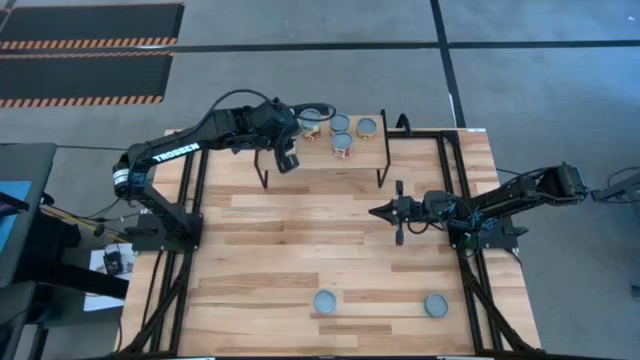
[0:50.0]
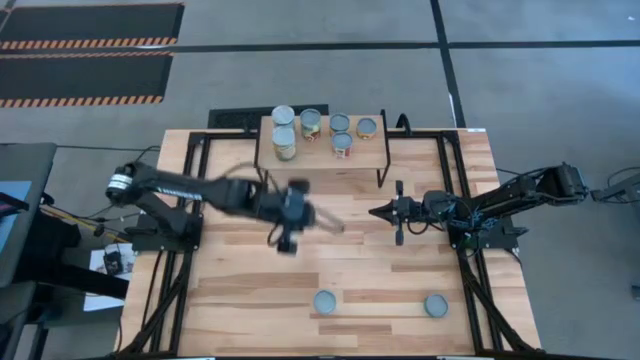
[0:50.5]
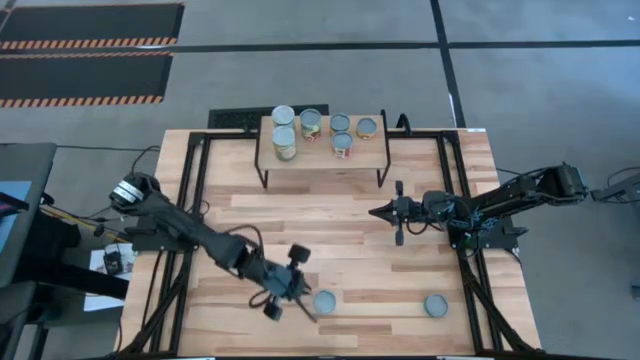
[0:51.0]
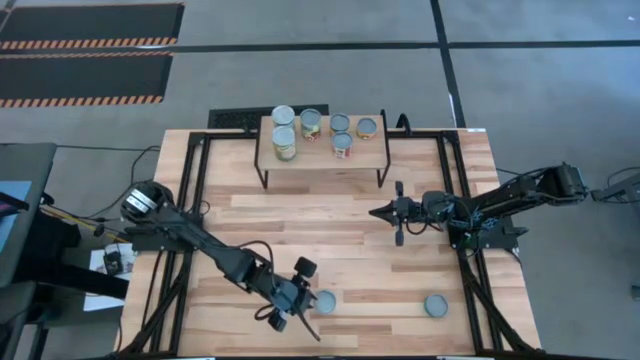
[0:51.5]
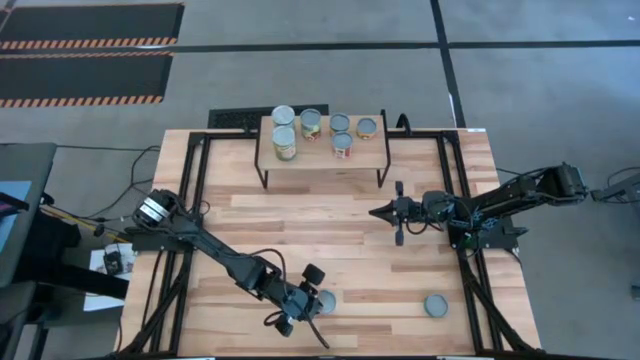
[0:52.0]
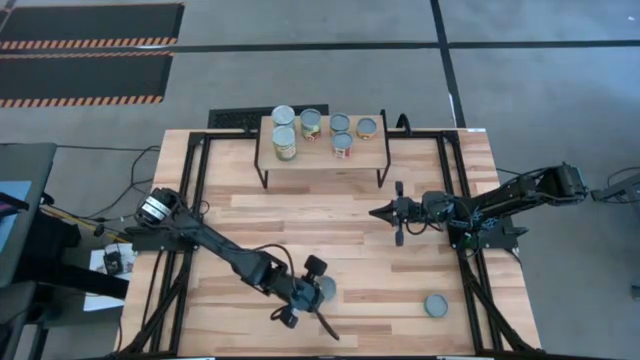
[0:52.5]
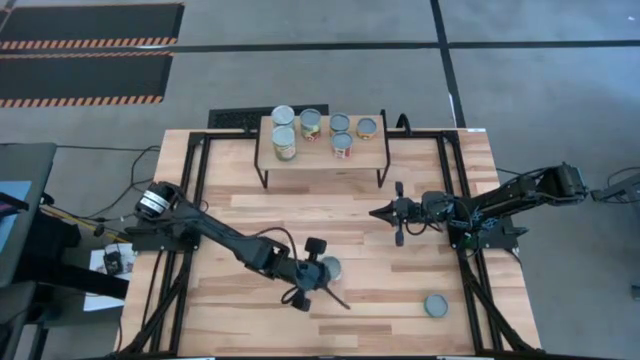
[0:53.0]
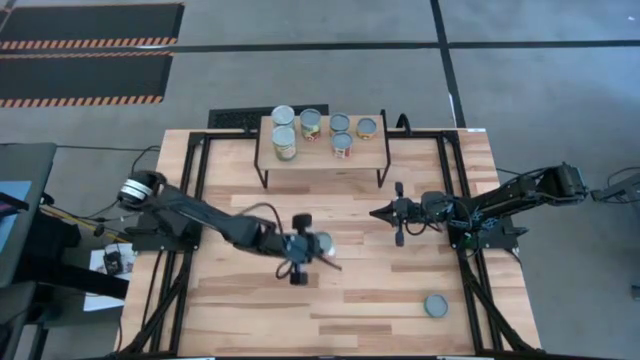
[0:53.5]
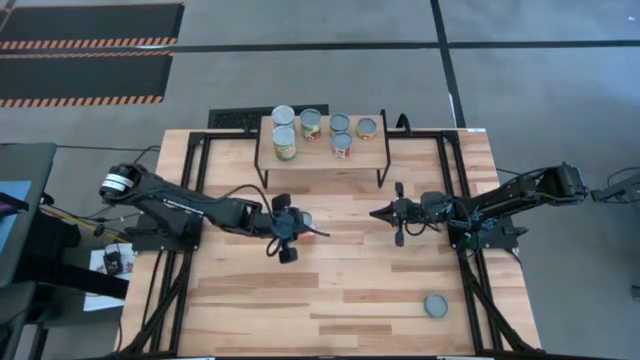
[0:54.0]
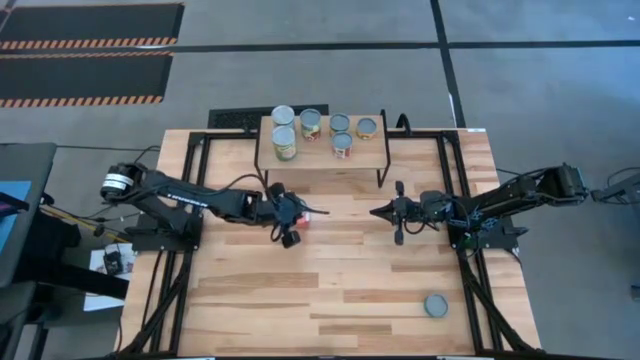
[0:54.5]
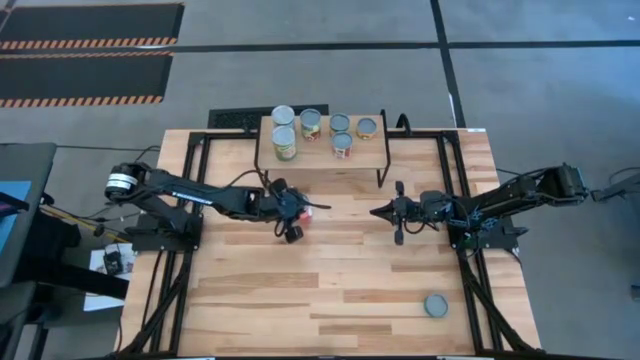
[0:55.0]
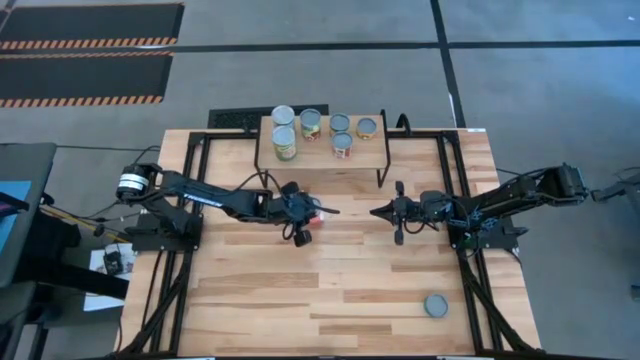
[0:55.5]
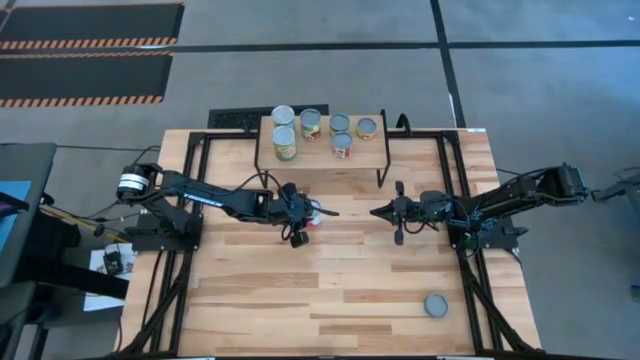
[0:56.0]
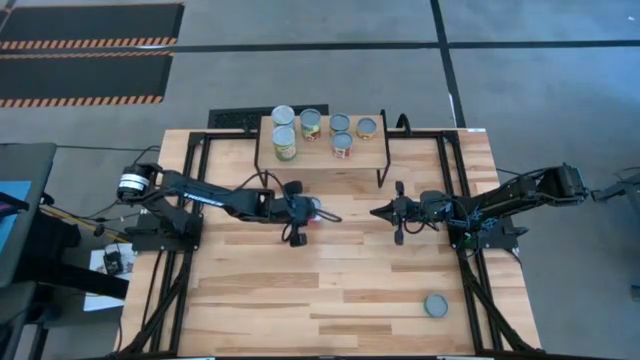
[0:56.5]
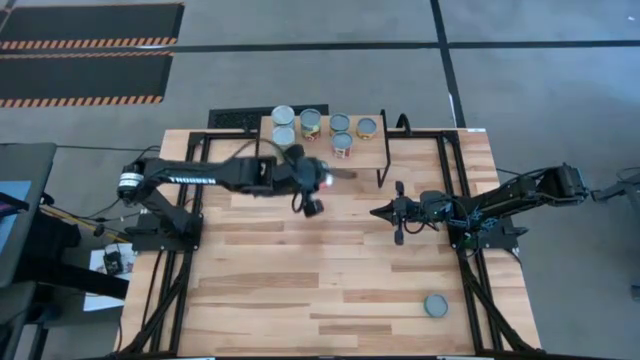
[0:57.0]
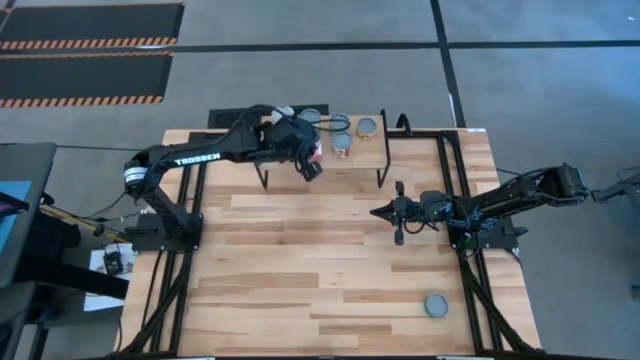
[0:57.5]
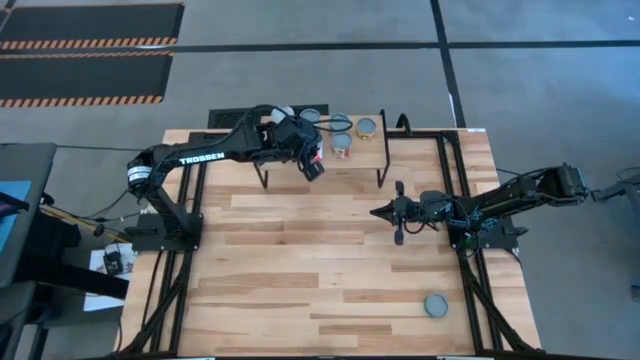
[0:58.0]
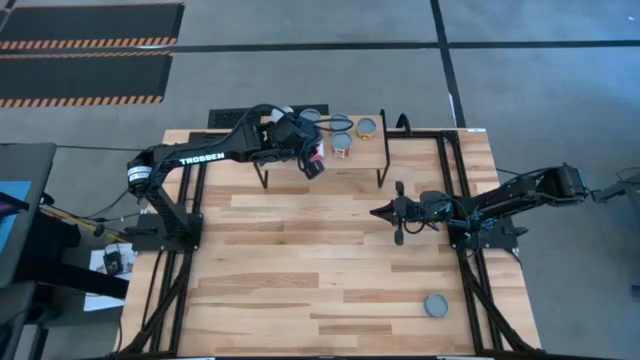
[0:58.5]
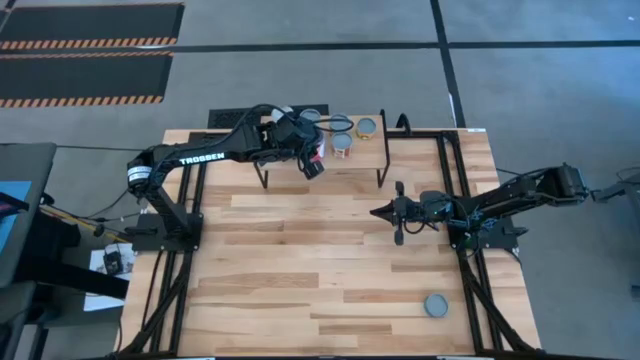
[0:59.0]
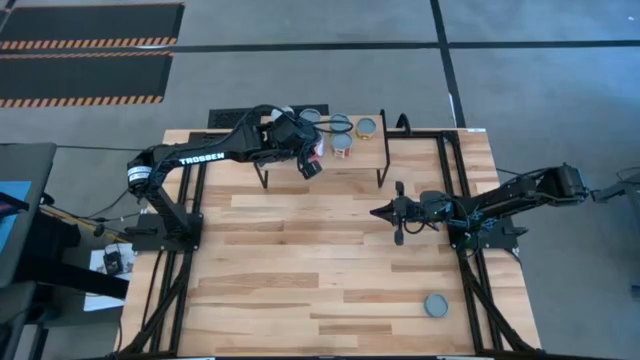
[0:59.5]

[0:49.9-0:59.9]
Task: Pick and place cans onto a shelf
Put the canned mixed fruits on the shelf aligned with the canned spaghetti sauce

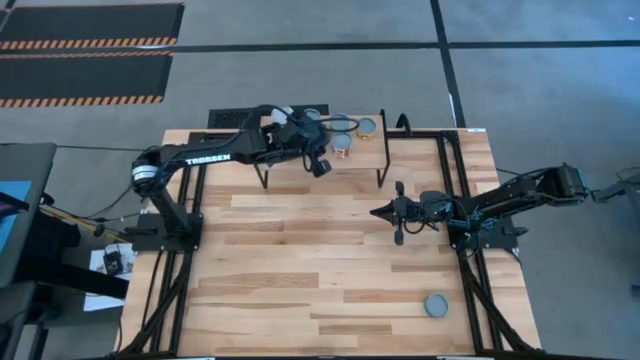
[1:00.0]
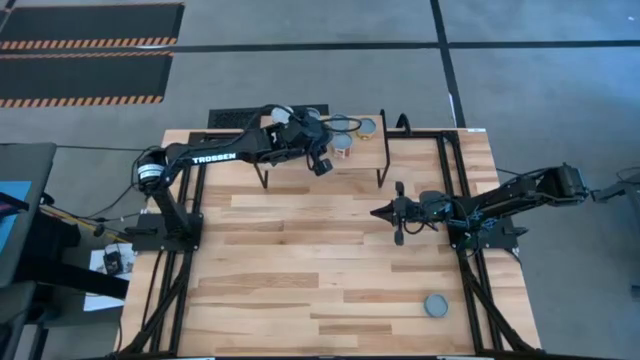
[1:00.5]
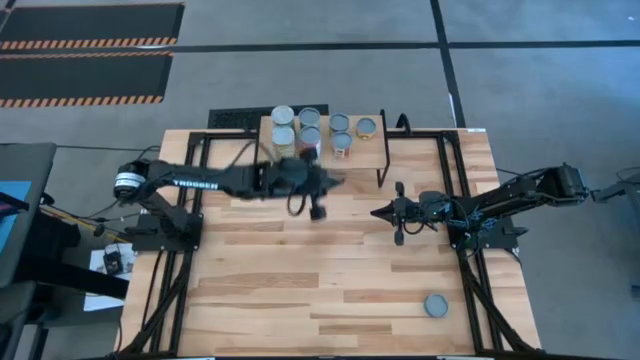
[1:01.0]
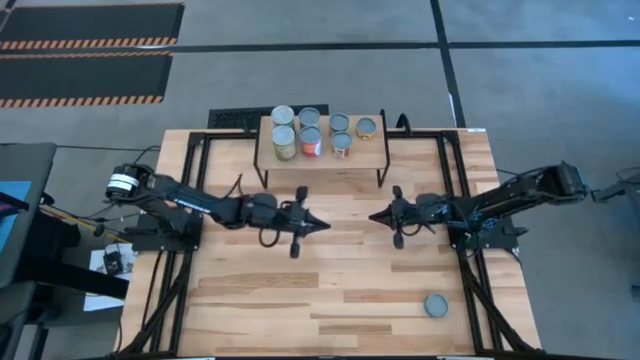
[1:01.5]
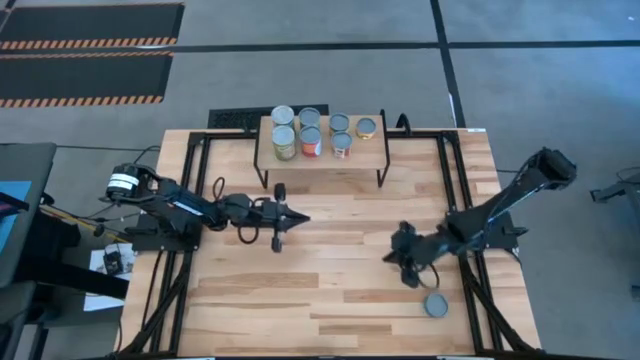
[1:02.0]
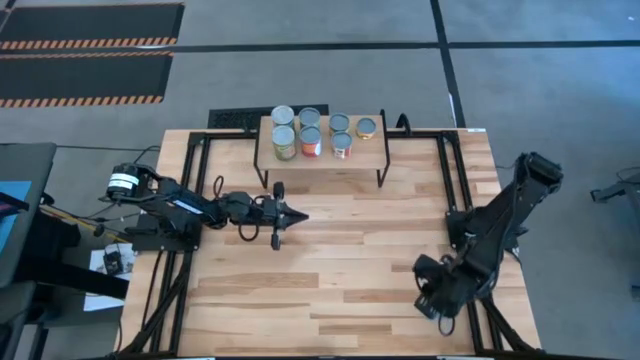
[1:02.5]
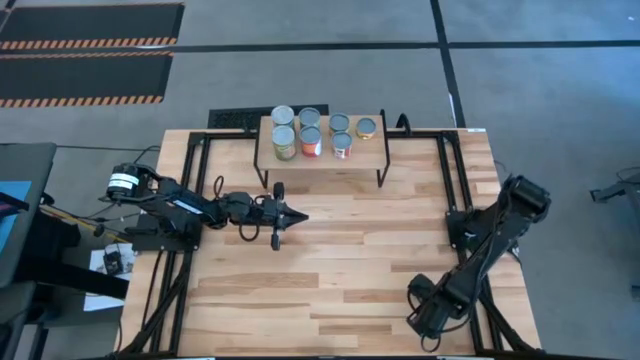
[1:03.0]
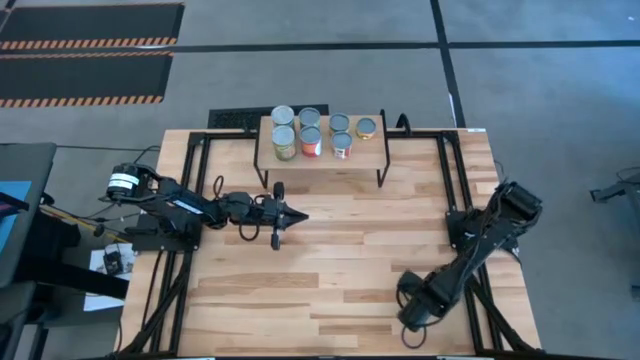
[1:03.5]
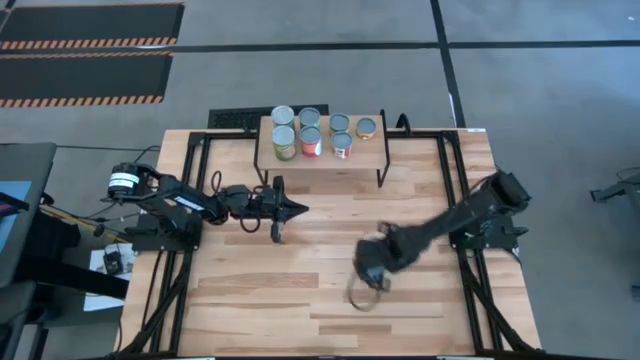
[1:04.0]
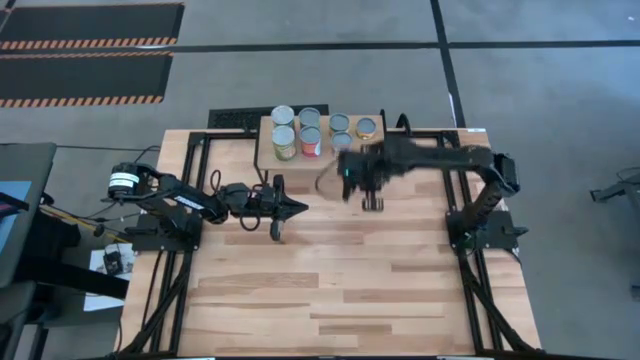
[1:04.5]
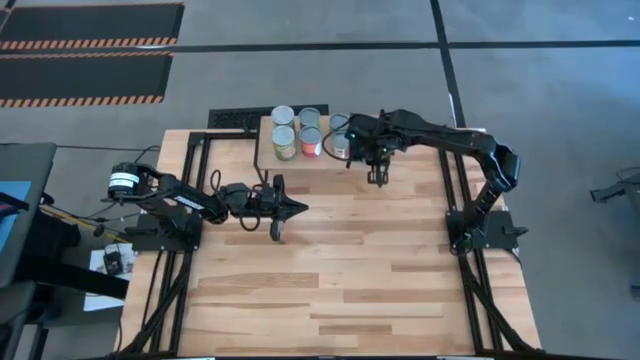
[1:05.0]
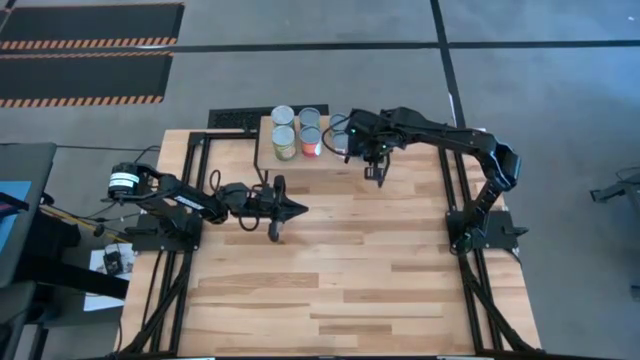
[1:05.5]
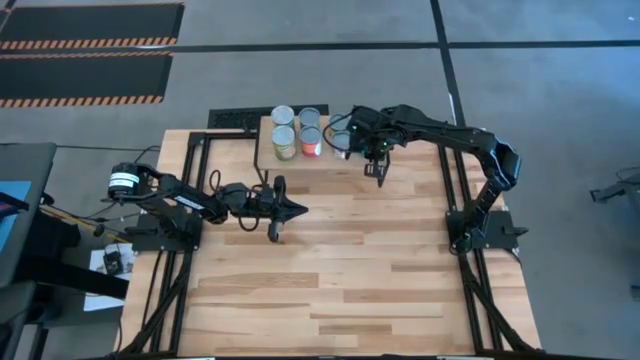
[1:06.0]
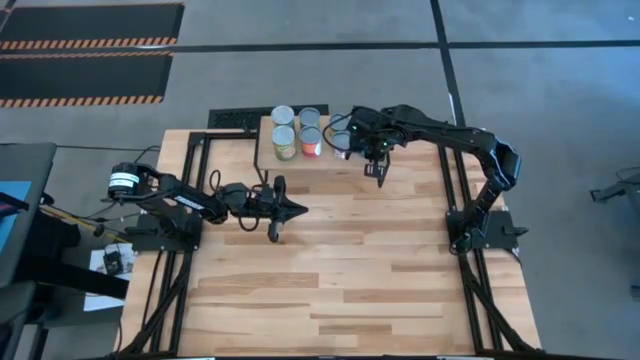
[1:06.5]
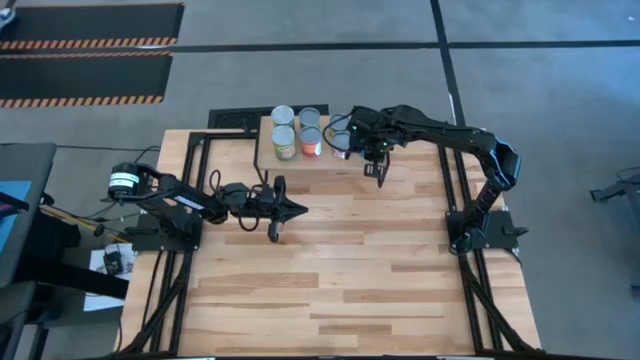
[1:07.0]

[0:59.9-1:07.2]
Put the green can on the shelf aligned with the canned mushrooms

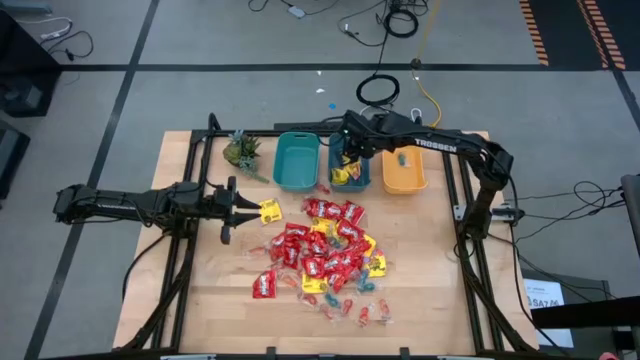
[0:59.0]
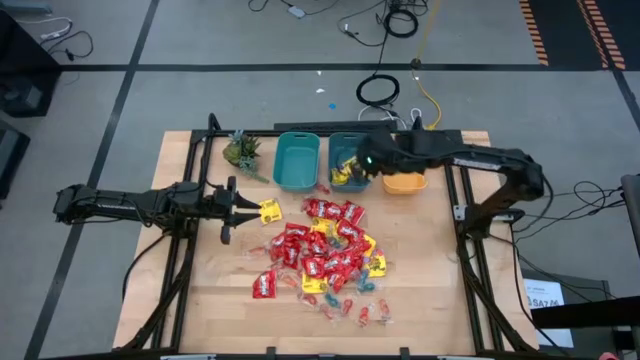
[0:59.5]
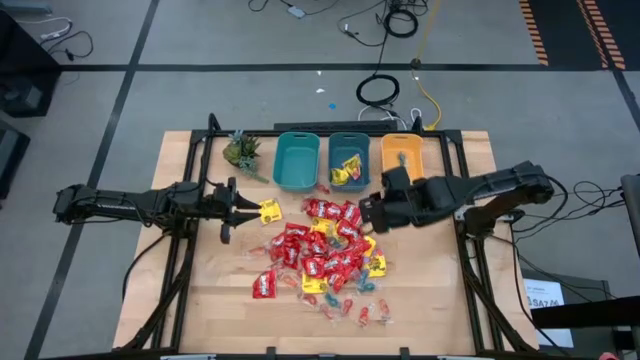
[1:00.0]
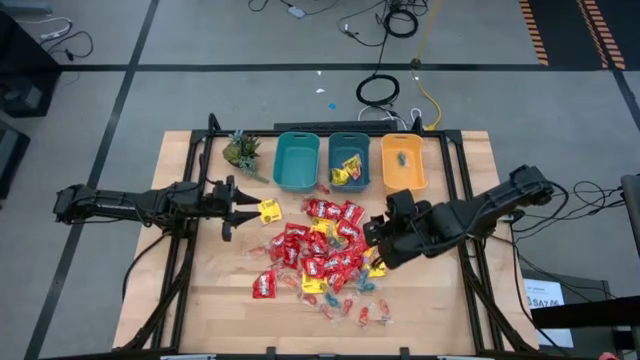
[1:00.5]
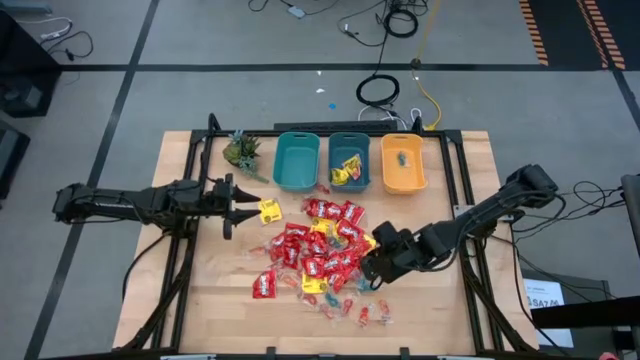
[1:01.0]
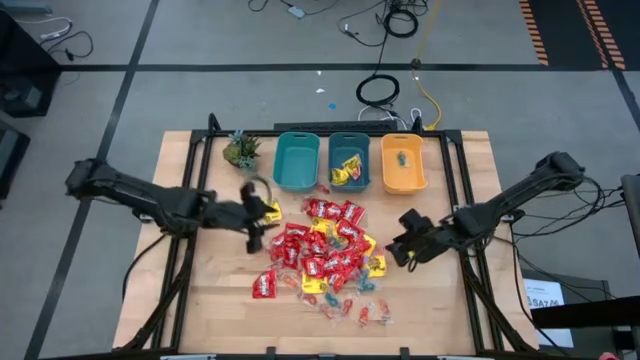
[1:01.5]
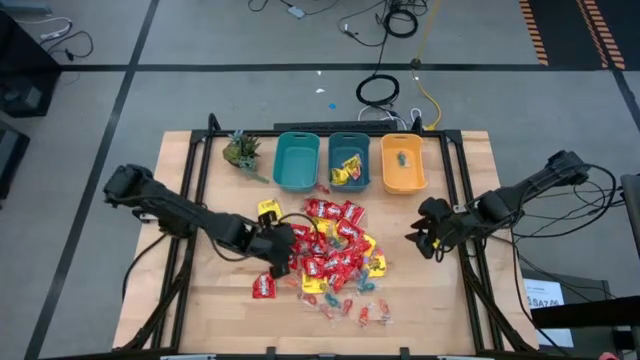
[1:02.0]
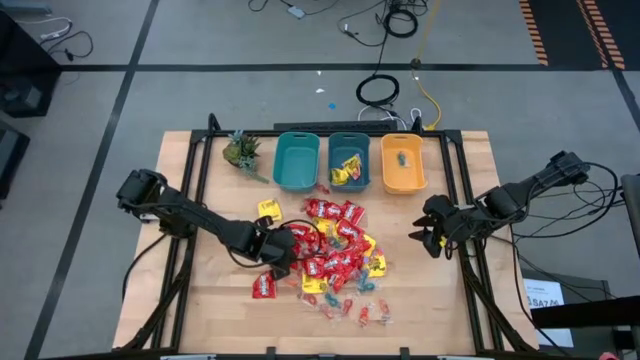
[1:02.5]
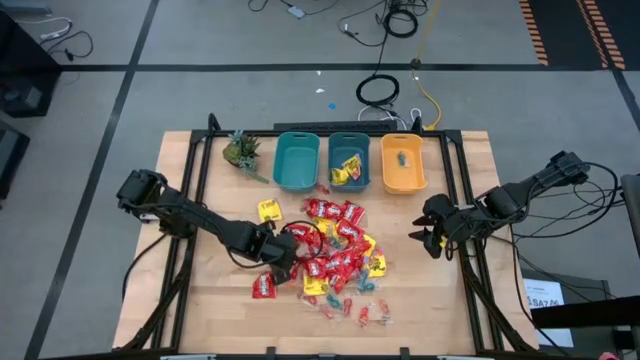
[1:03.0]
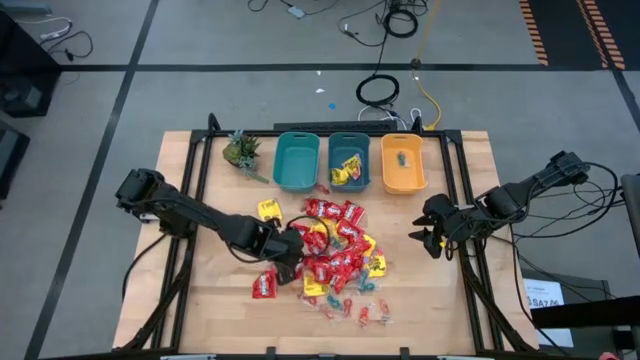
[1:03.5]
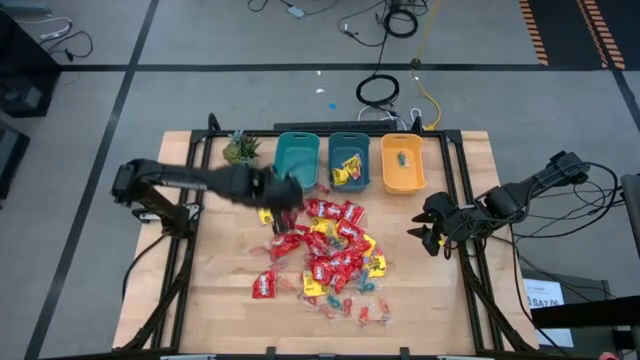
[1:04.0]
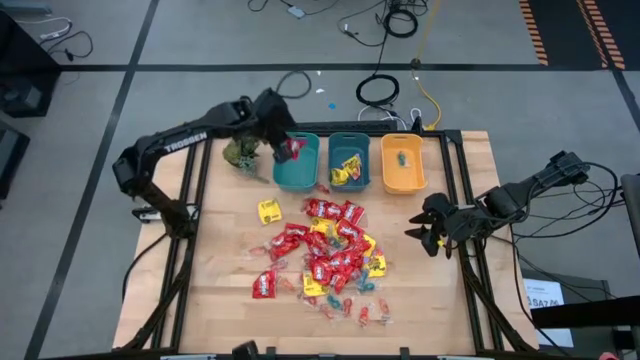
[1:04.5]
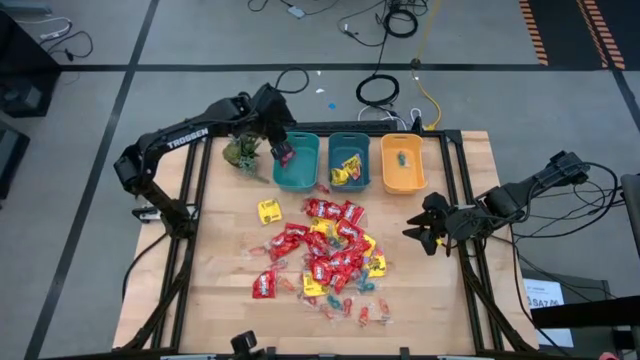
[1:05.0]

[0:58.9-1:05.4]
Task: Sort candy
Put the red candy into the green bin
